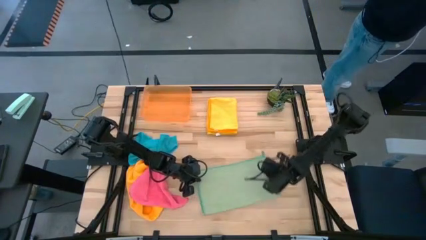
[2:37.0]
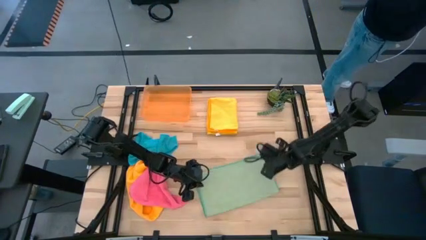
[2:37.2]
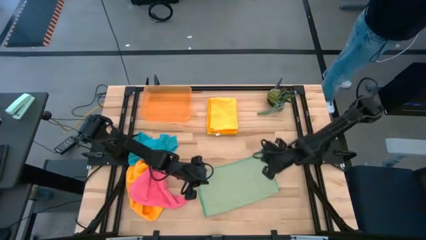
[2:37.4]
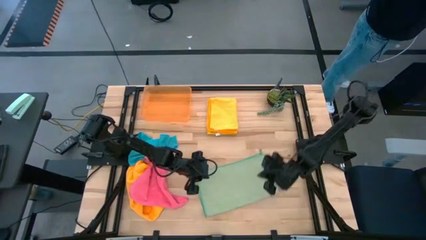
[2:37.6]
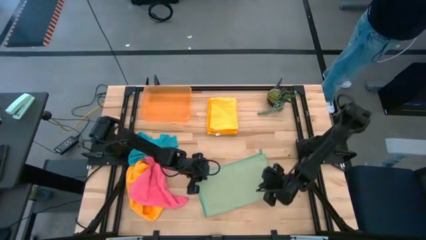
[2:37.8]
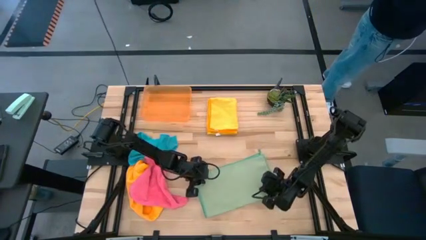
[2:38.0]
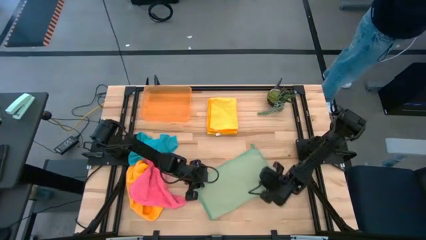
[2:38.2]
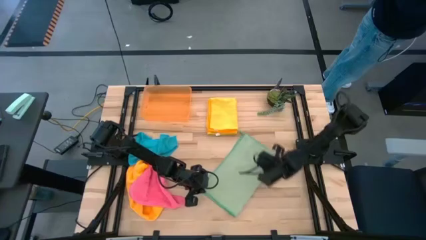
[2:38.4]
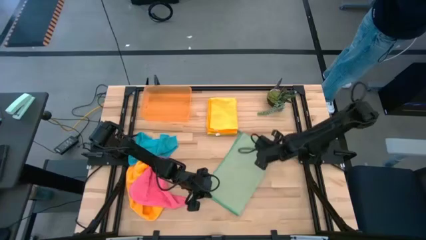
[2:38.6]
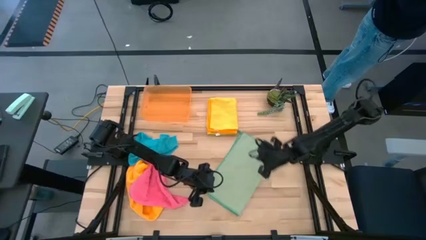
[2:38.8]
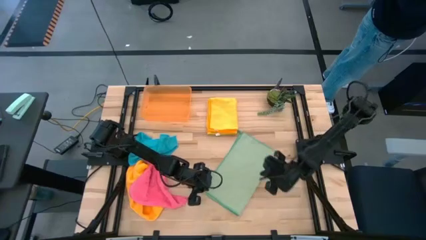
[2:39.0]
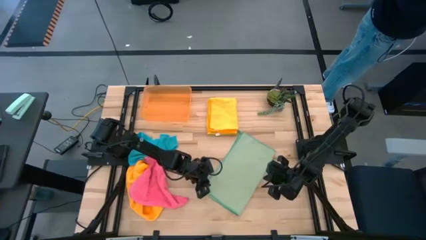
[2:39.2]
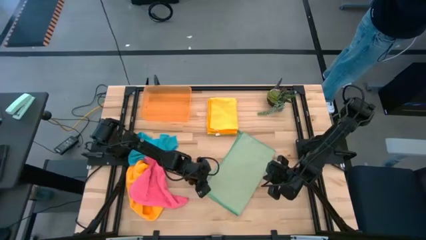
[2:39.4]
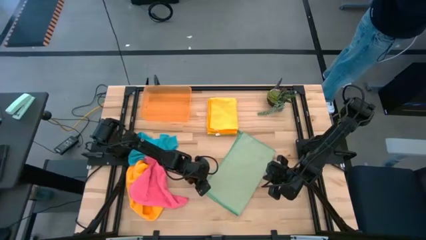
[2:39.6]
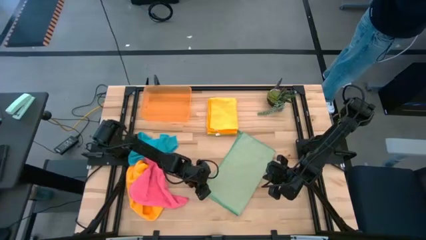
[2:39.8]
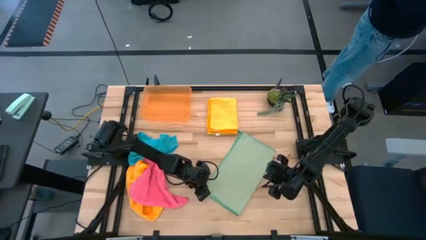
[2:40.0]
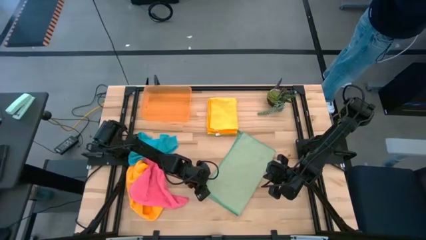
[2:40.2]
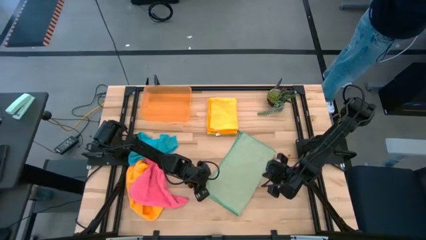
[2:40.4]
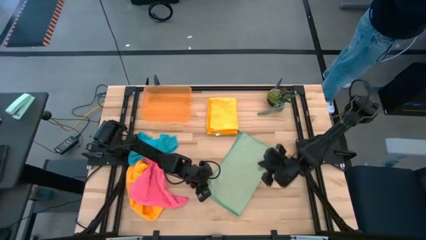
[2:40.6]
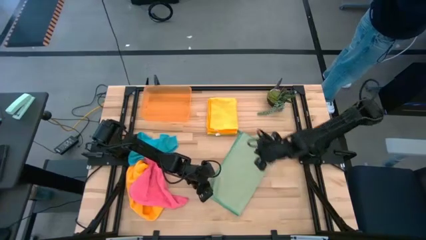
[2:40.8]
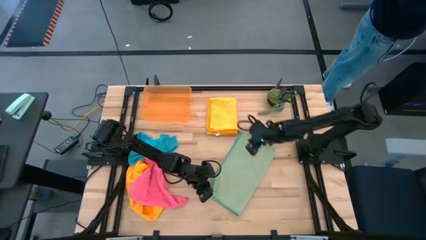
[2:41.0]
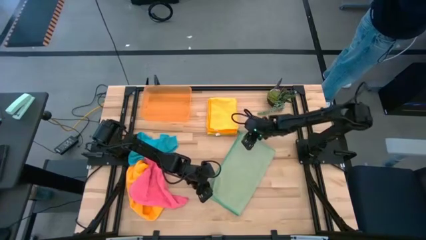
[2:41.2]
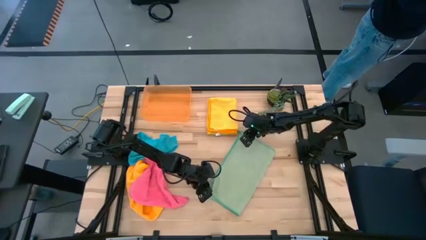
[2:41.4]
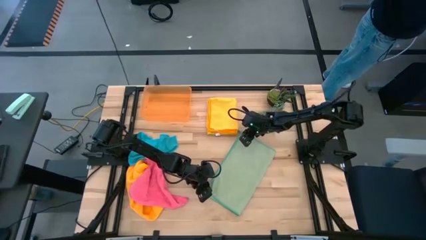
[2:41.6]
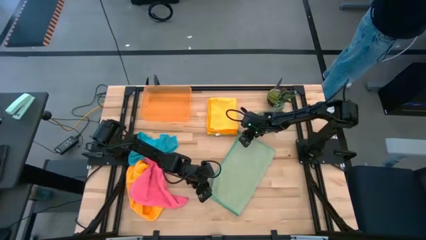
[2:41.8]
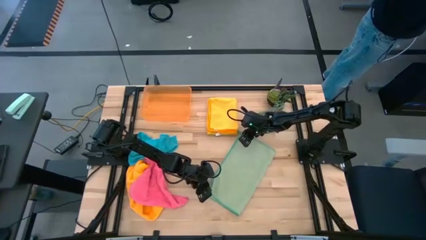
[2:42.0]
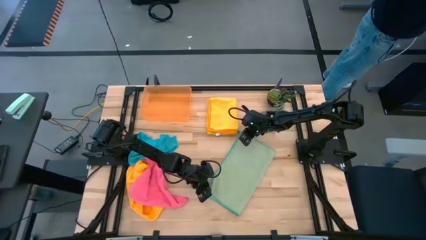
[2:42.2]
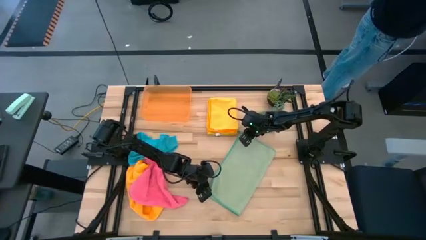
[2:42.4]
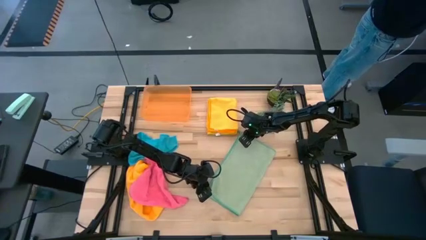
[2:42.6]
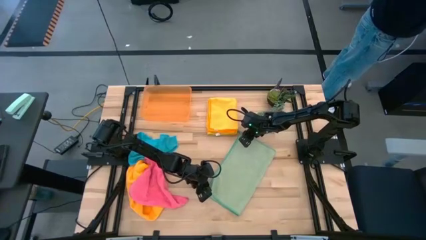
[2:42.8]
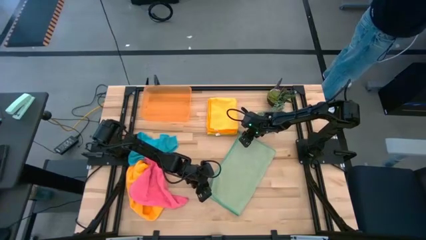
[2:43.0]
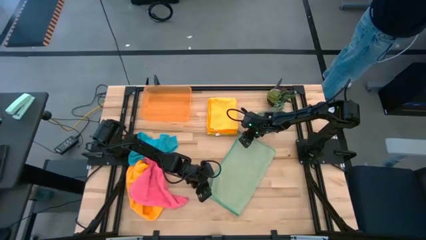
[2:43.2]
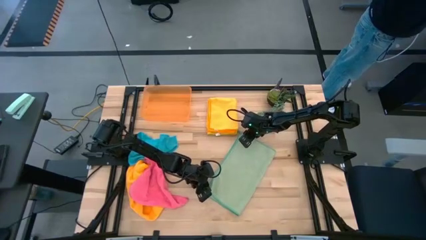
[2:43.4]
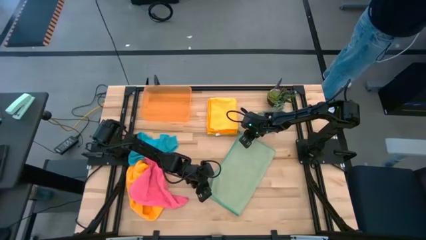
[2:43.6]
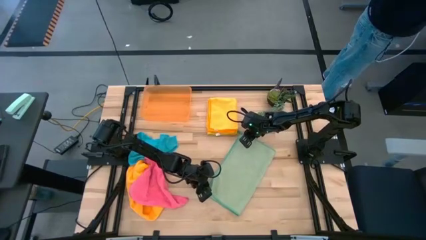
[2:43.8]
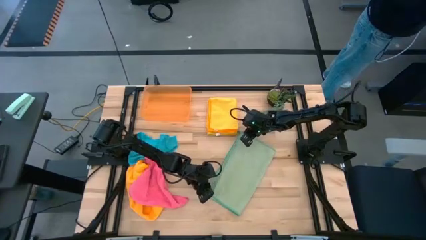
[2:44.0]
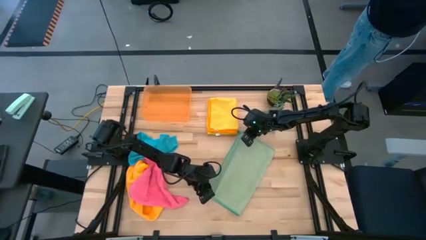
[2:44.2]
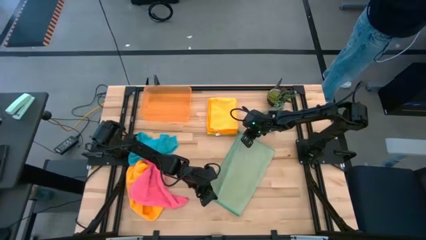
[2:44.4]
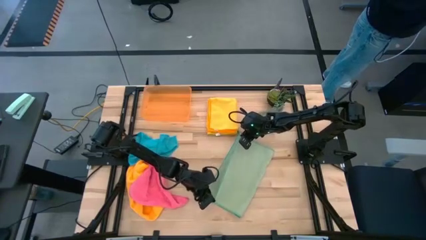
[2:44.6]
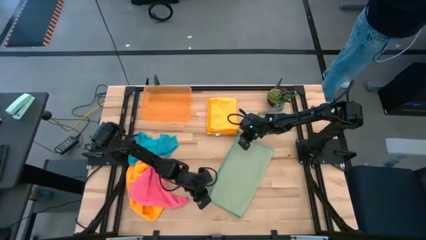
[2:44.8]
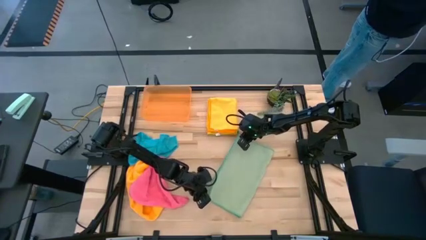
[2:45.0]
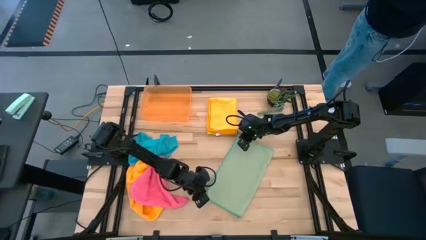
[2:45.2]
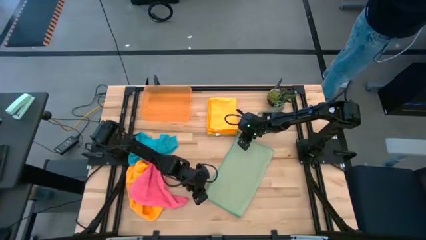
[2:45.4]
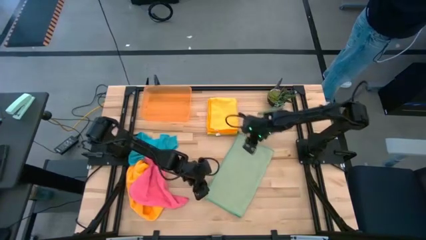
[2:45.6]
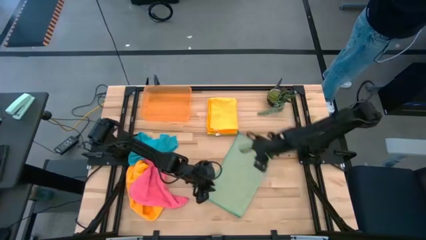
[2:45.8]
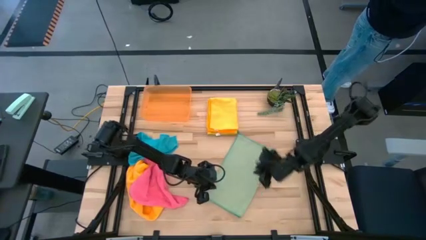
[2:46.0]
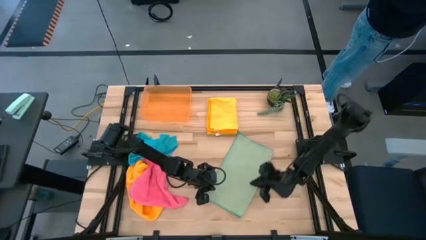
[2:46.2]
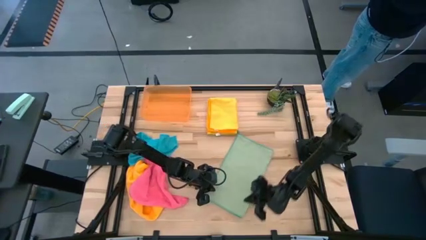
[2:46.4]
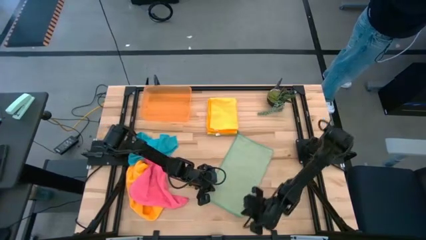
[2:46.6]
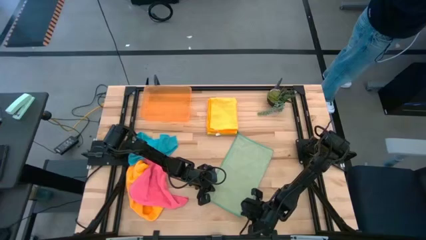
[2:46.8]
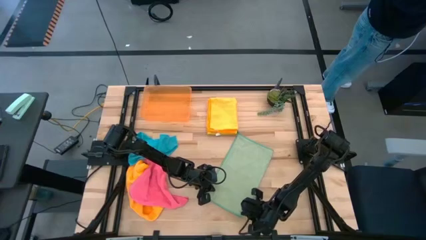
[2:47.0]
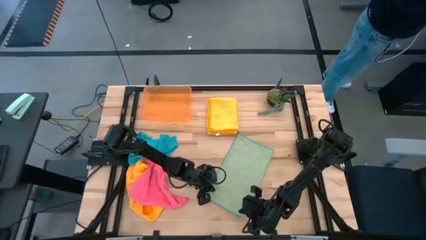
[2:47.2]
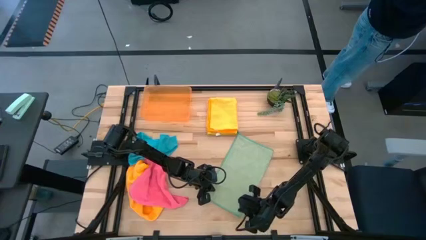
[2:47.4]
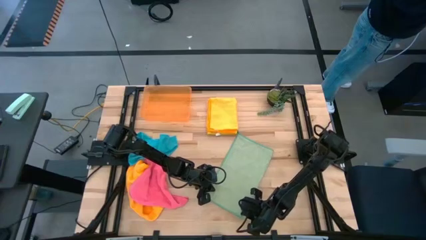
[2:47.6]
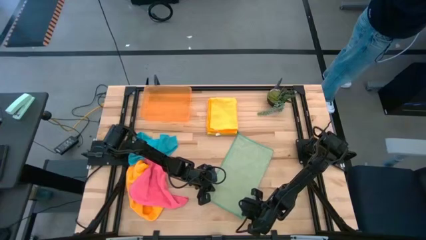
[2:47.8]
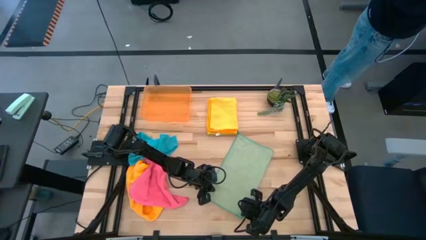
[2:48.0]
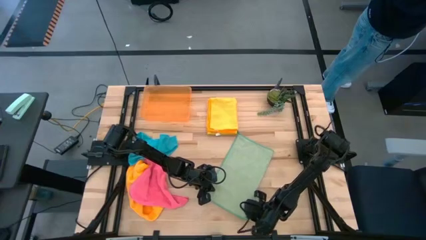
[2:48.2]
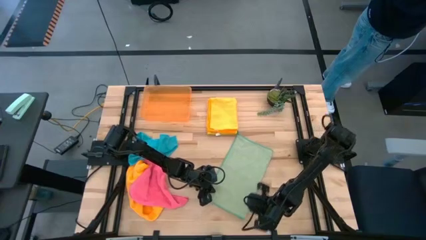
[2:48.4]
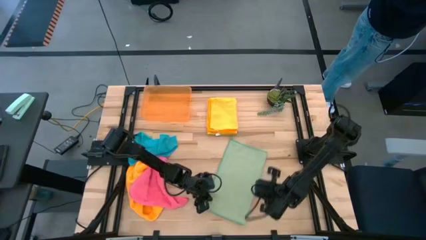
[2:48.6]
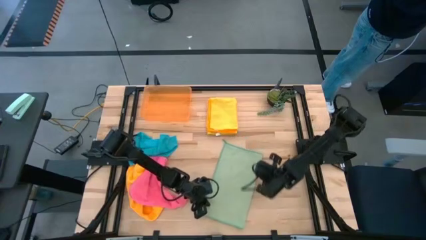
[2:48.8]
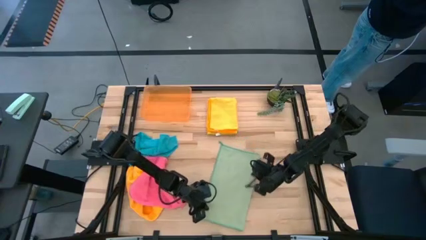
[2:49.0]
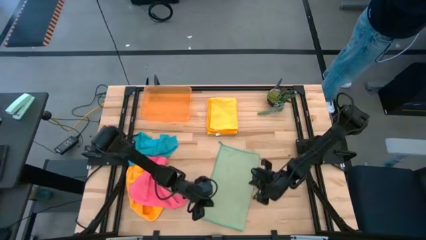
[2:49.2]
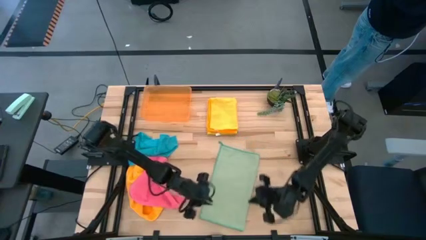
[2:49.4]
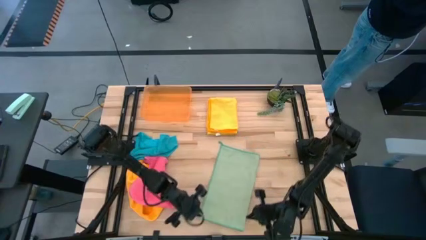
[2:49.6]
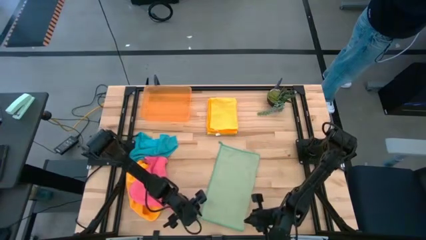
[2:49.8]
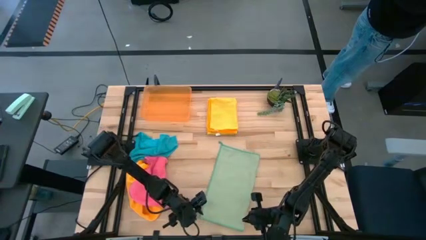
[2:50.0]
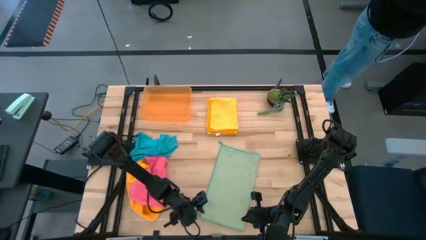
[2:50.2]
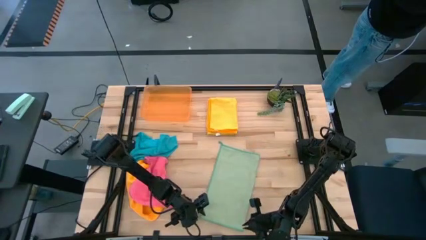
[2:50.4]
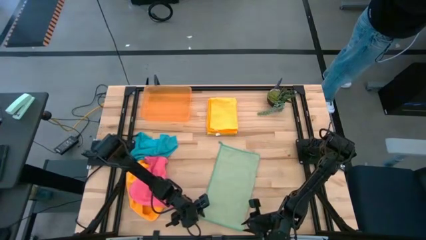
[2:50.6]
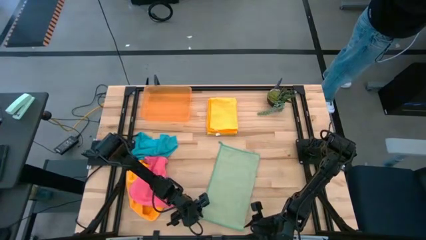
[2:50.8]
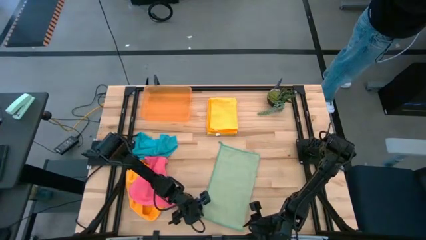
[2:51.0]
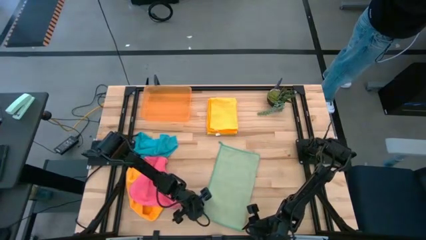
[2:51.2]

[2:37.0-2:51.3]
Task: Fold microfiber towels
Fold the light green towel

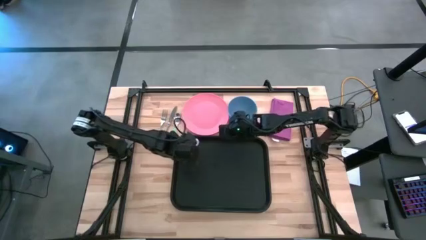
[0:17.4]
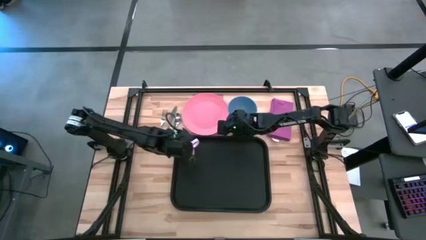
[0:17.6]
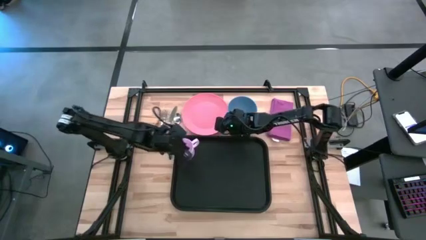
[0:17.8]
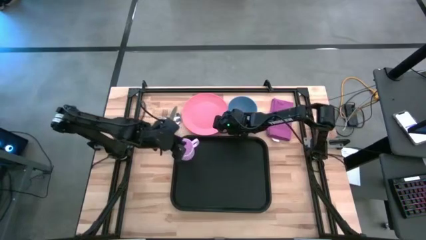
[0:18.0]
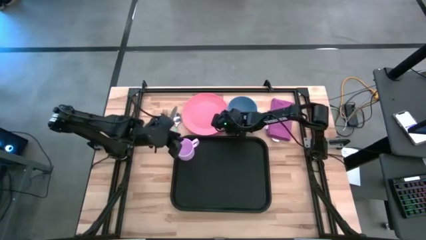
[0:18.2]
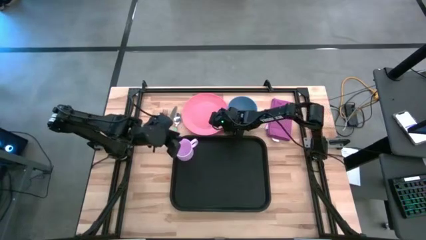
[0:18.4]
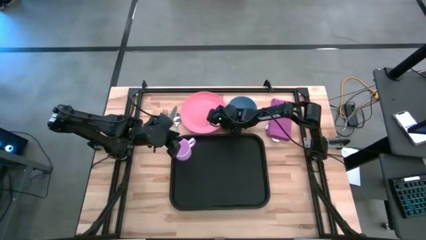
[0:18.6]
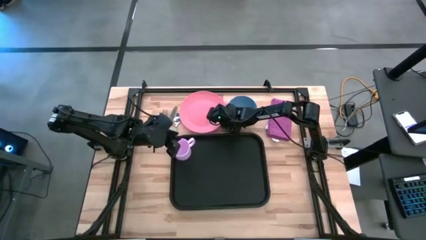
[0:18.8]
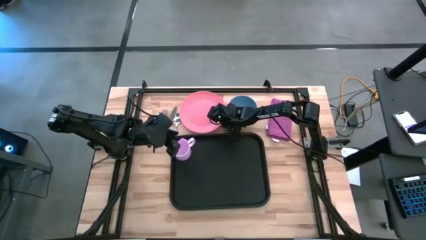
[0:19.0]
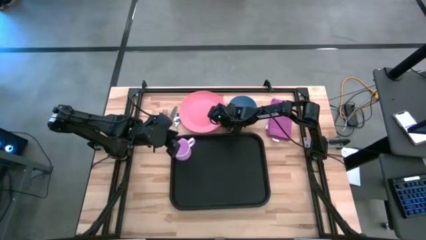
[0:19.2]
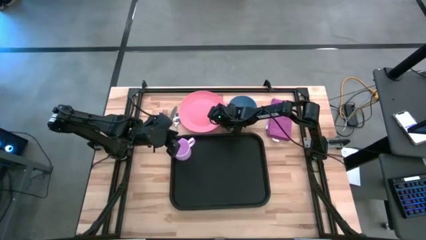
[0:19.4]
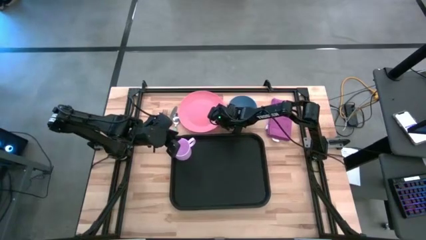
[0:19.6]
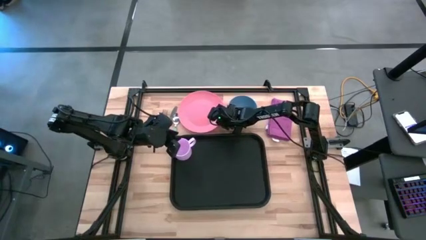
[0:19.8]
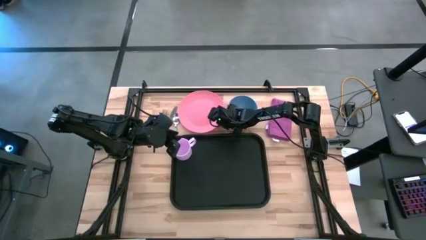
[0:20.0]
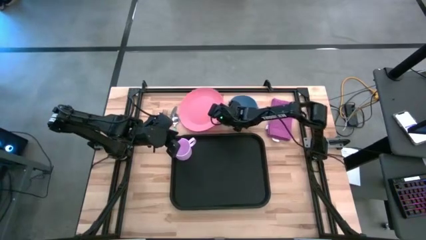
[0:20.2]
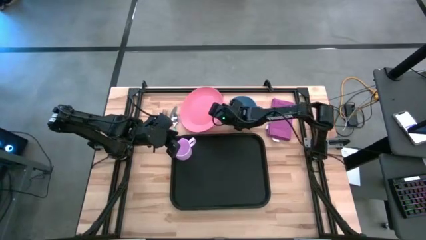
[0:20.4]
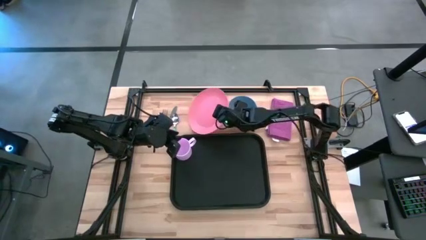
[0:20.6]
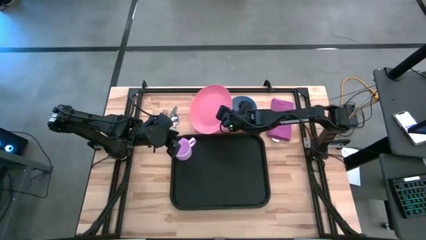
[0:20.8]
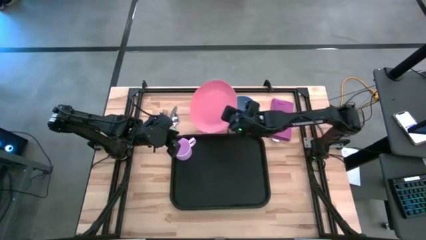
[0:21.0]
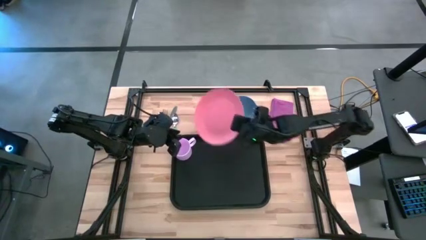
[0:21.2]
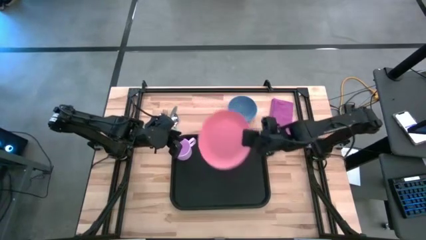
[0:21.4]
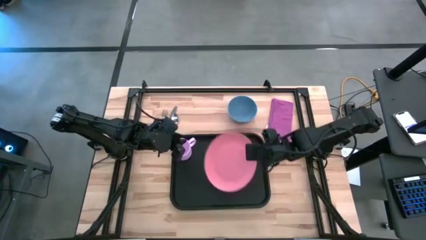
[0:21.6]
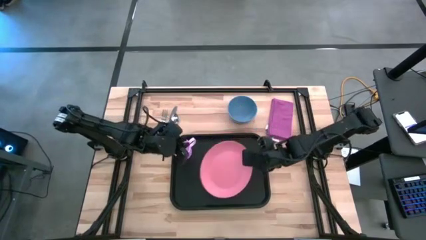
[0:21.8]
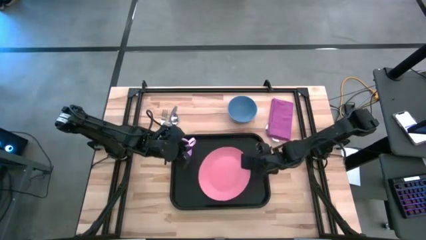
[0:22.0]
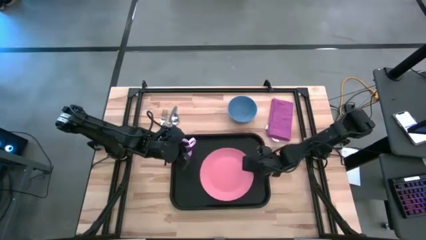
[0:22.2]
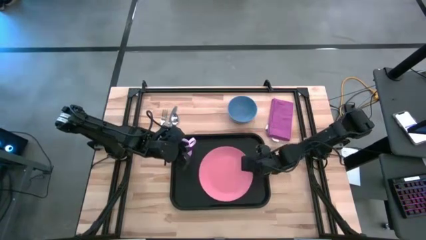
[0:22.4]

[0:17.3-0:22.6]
Task: Set up tray
Put the pink plate to the right of the light purple mug on the black tray
